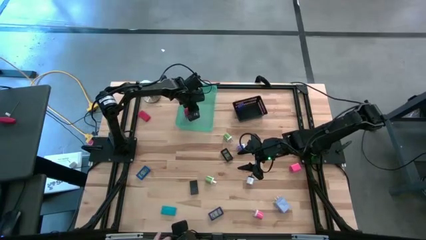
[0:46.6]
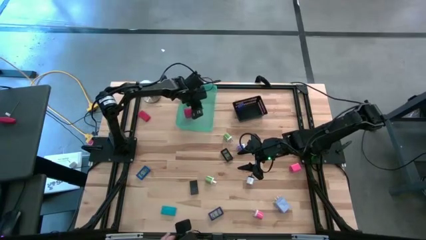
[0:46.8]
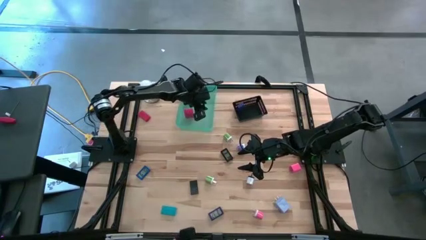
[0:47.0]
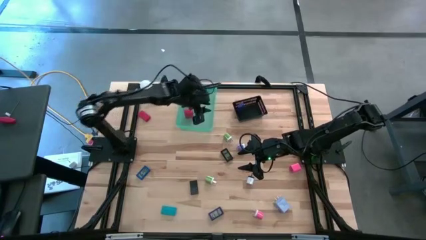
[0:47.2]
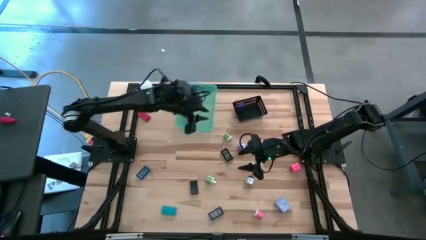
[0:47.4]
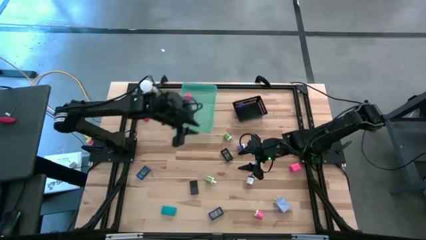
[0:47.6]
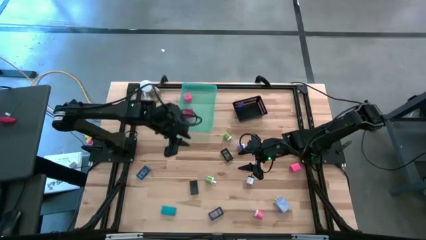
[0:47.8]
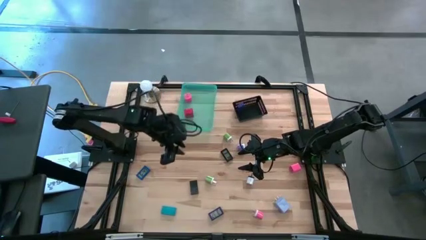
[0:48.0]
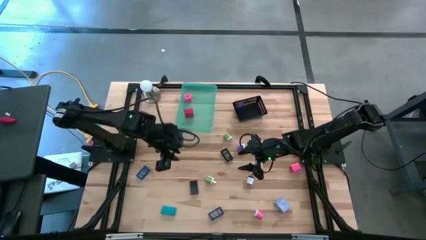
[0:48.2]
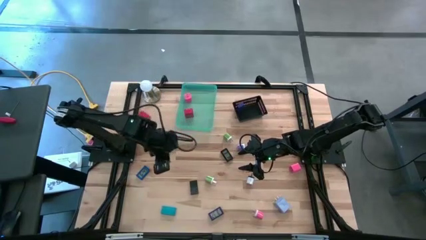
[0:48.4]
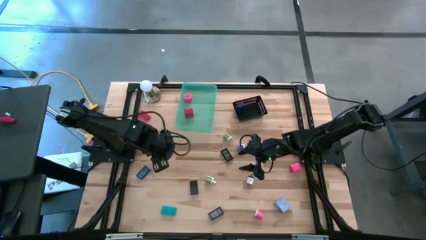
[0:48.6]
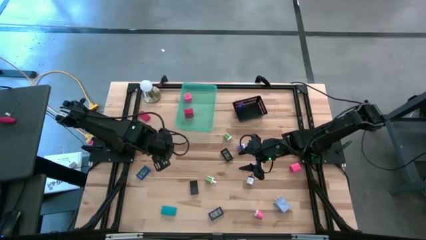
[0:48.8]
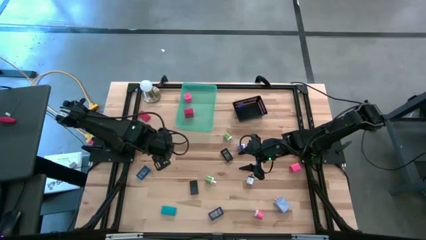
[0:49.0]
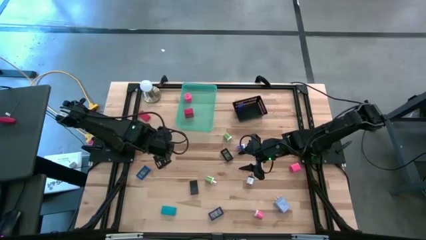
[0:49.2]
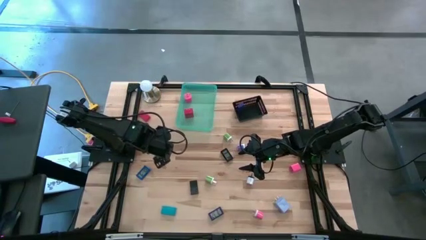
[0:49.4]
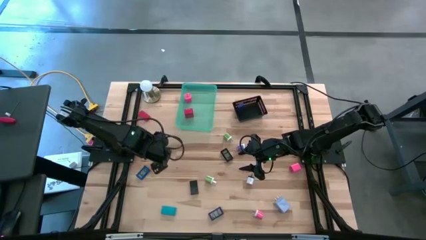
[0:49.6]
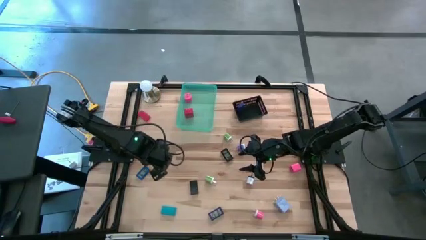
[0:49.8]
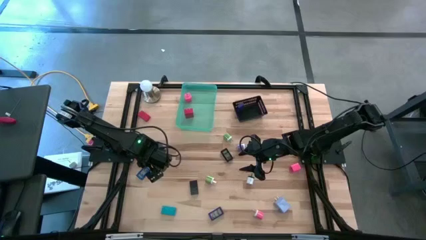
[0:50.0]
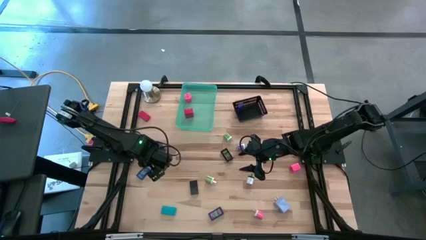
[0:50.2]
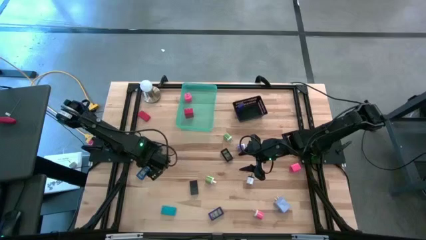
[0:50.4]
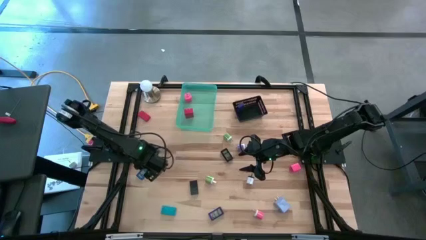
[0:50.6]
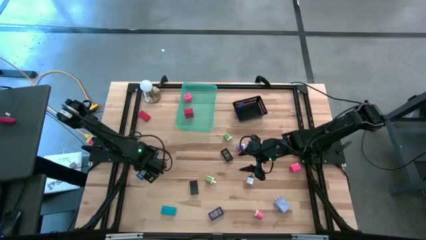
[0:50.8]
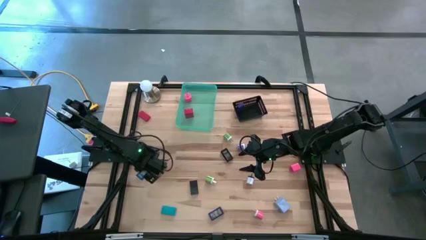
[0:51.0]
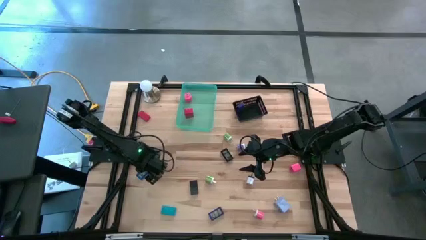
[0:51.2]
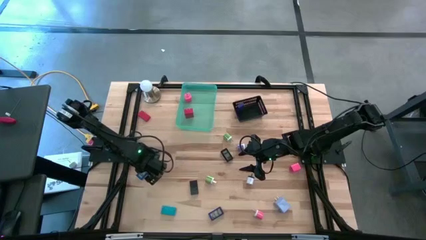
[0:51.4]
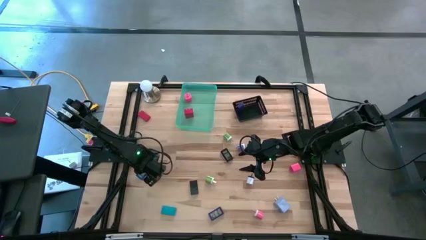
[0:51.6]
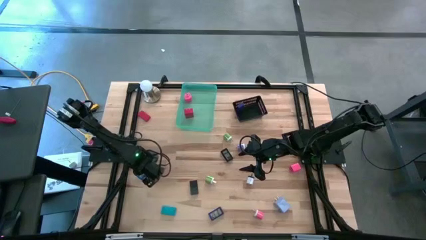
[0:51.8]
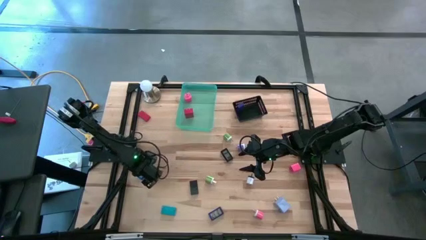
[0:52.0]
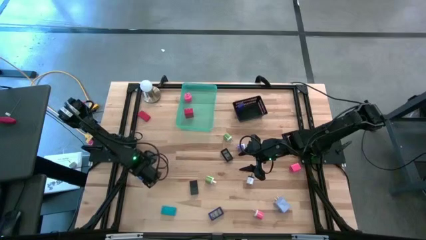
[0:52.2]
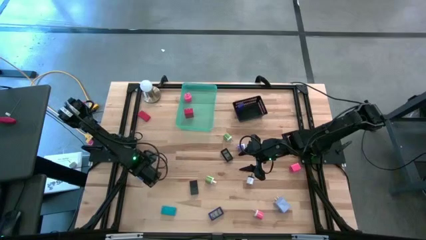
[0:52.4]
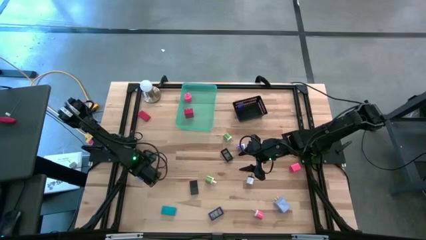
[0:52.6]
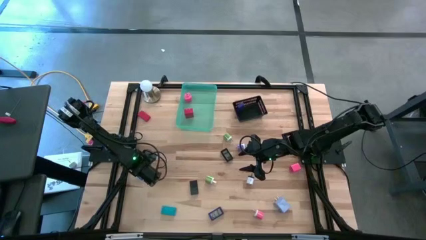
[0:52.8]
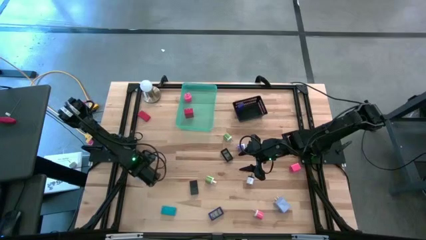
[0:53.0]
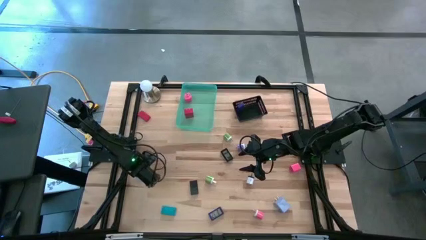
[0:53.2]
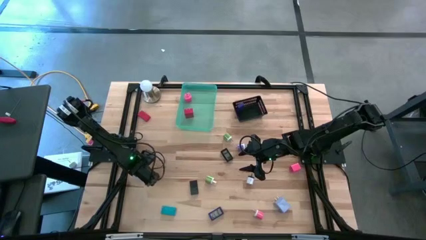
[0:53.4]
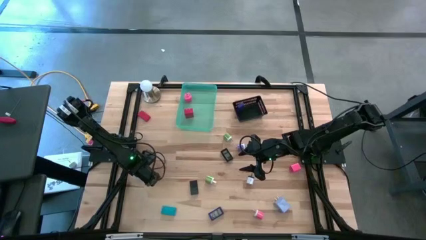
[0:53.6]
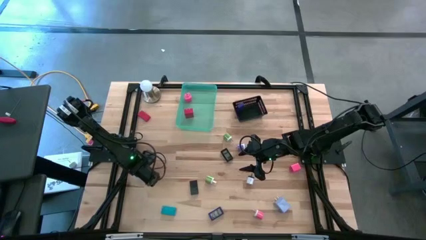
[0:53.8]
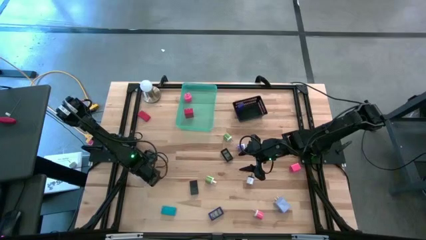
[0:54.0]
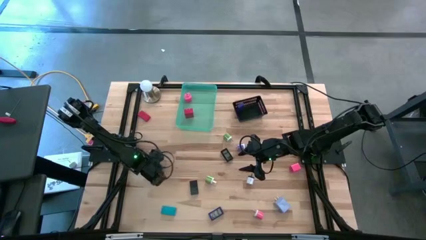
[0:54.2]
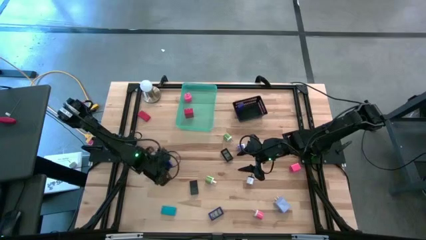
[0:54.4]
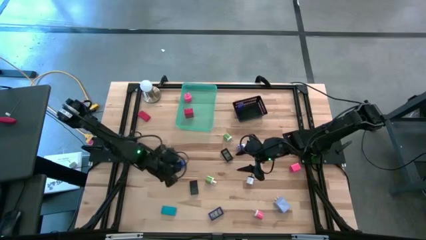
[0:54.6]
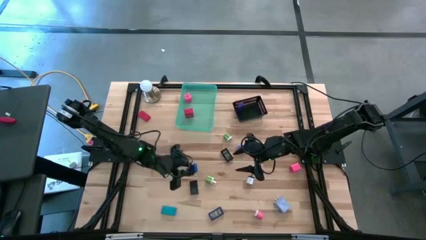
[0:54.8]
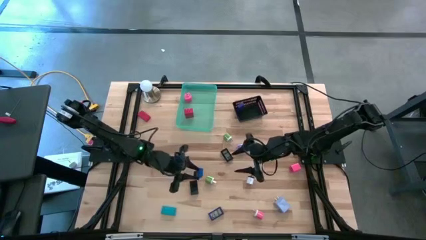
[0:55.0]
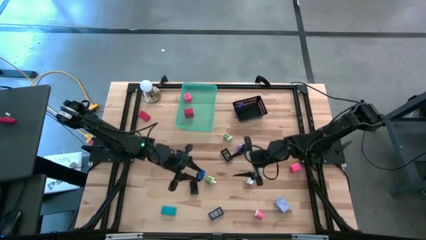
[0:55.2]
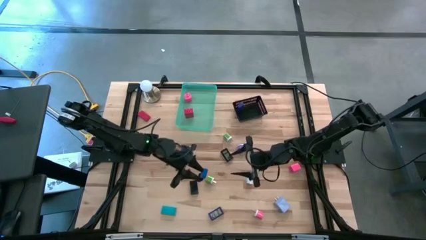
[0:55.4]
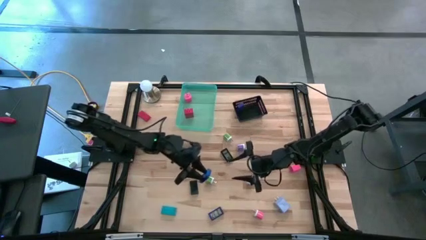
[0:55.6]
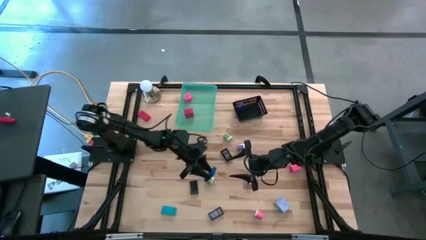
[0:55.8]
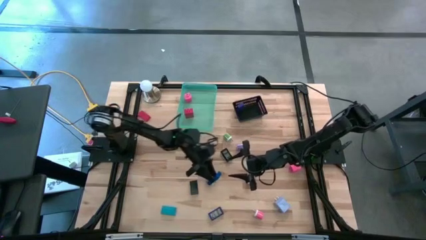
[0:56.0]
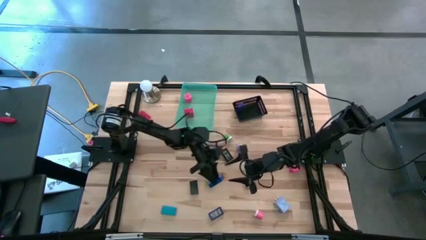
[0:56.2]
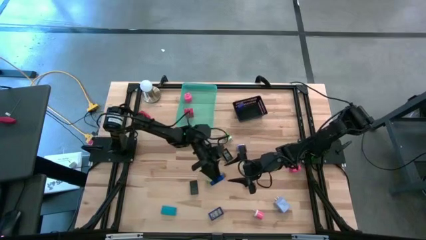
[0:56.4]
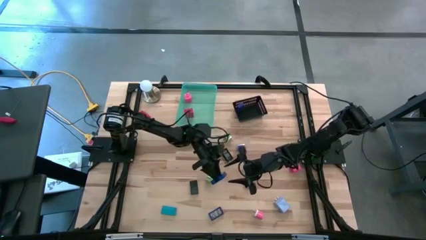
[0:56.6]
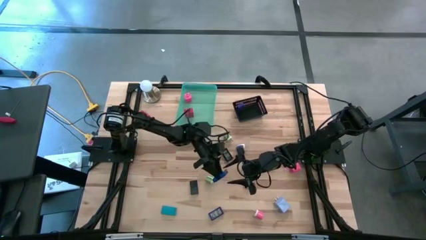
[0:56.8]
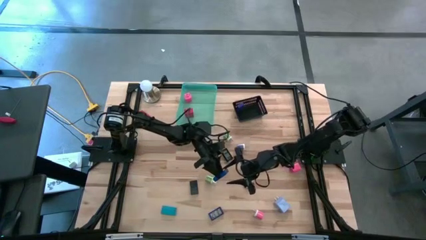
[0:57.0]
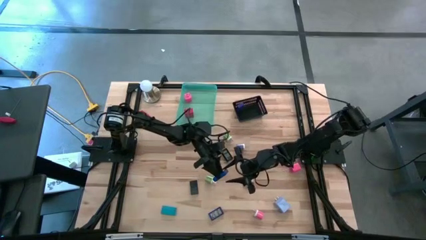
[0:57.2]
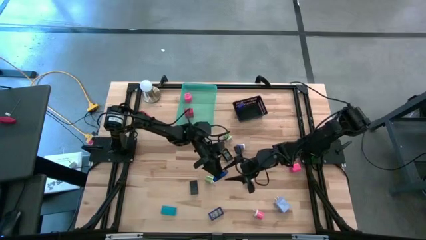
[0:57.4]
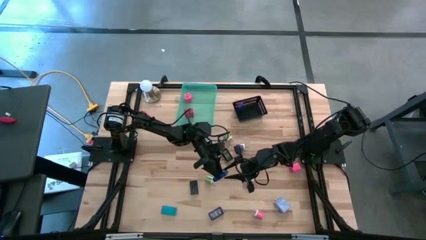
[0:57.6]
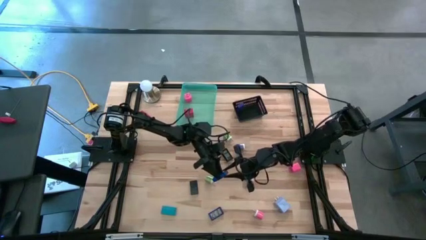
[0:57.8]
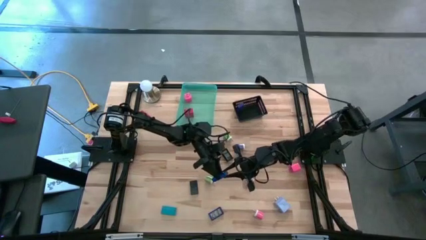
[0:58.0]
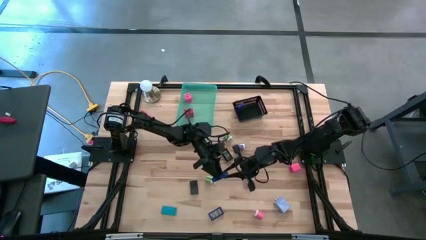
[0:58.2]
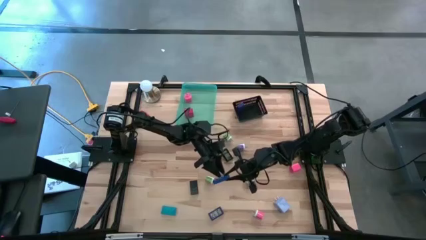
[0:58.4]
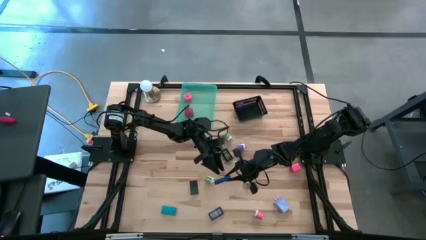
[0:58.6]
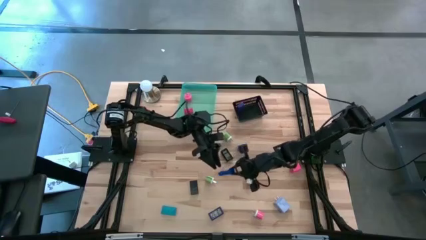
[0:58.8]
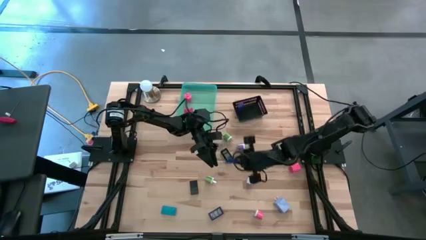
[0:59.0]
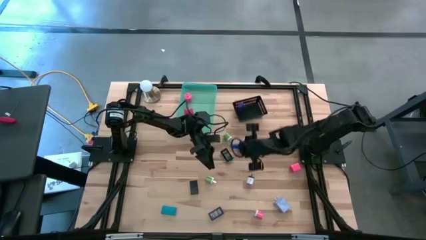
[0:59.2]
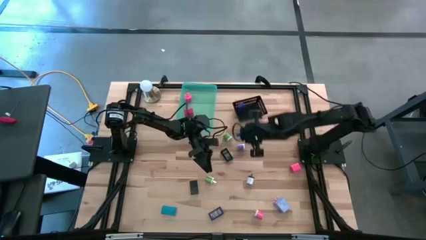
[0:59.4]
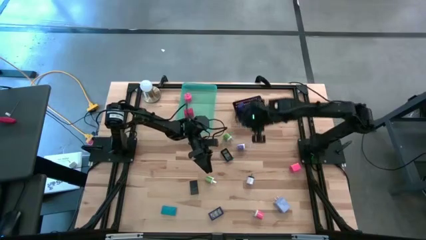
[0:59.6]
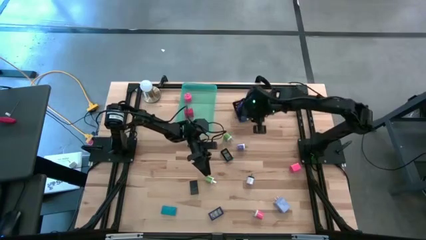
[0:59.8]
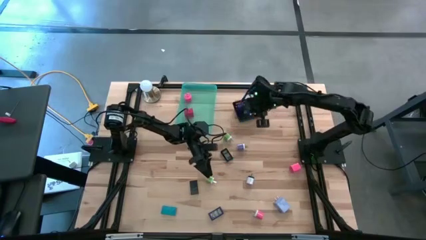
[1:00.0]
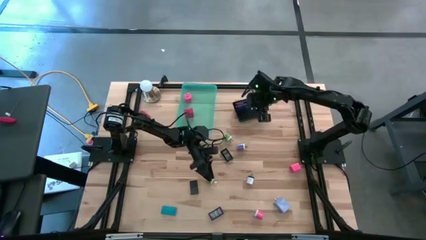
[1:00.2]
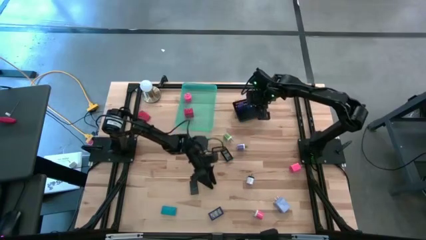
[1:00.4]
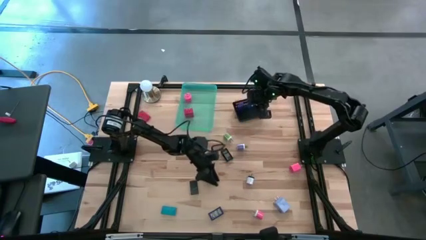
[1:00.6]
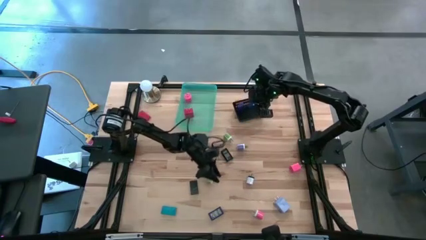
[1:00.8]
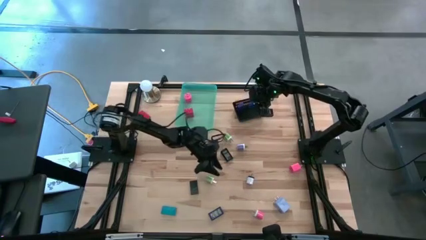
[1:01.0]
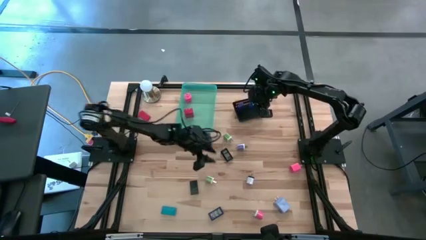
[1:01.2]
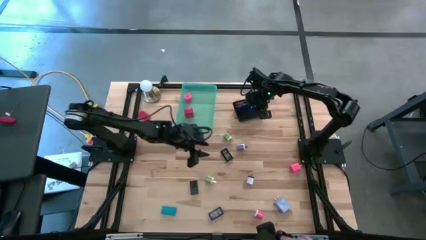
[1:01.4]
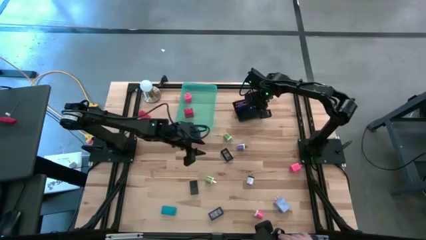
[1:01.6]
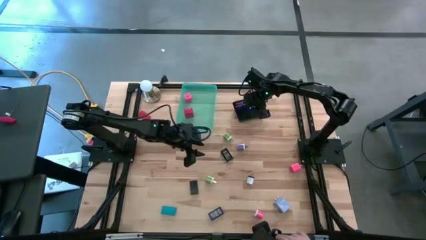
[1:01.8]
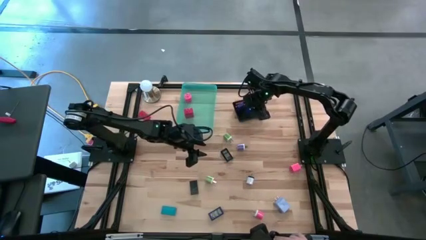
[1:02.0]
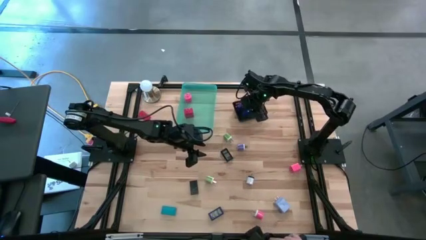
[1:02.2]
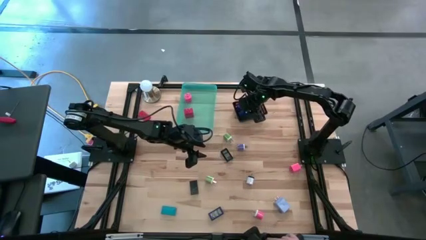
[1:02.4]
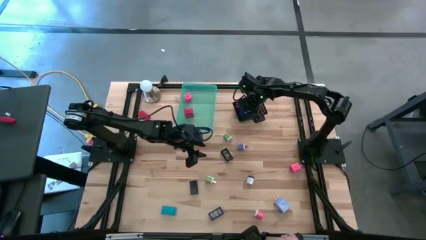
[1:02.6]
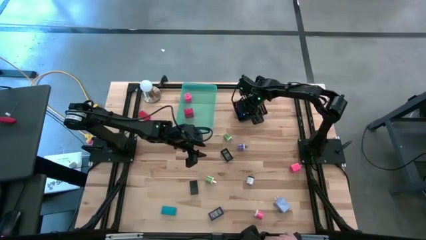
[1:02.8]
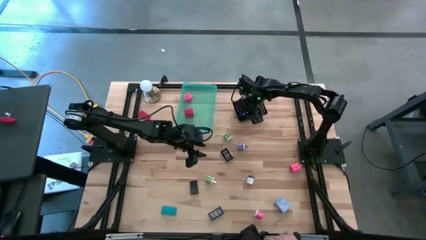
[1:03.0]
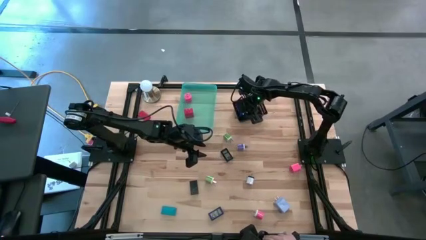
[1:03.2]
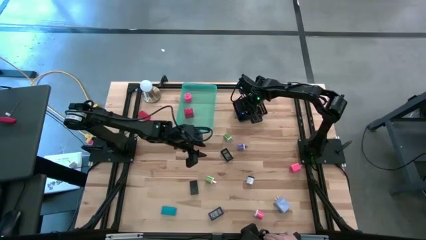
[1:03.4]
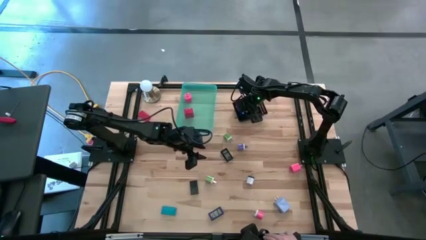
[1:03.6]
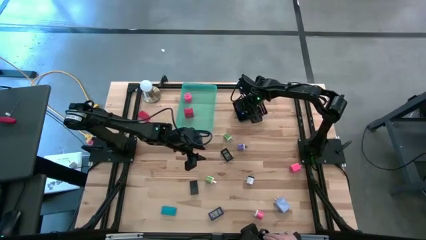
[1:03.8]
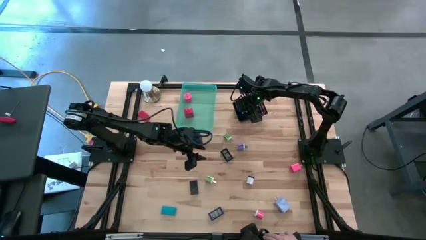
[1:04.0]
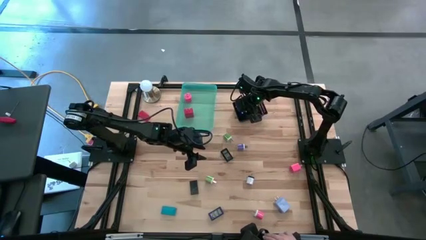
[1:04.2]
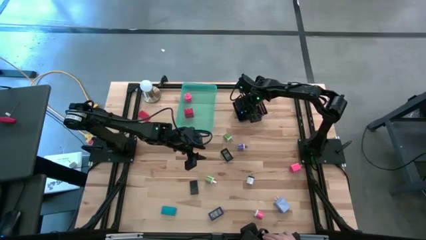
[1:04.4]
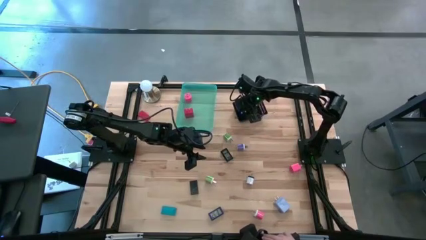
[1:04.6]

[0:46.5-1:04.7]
Task: Pick & Place Office items
Put the blue digital clock into the black bin
